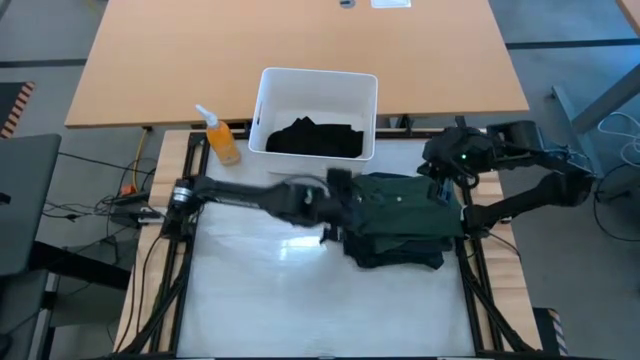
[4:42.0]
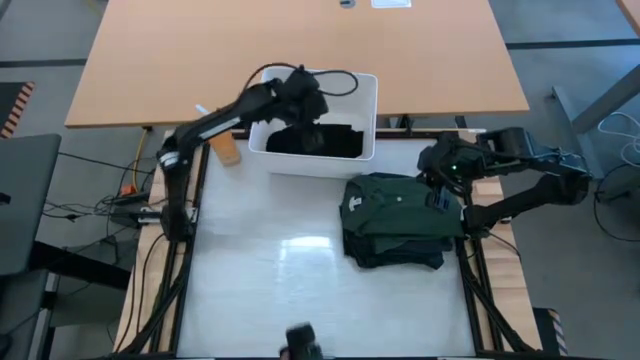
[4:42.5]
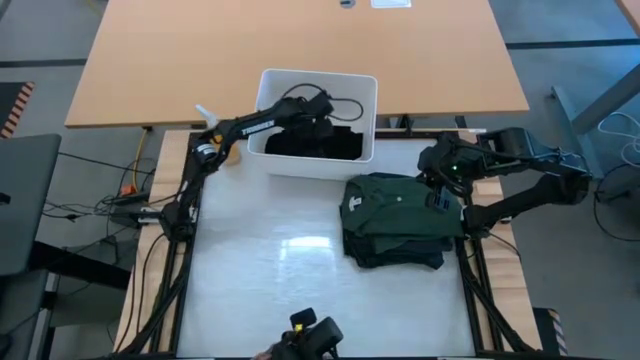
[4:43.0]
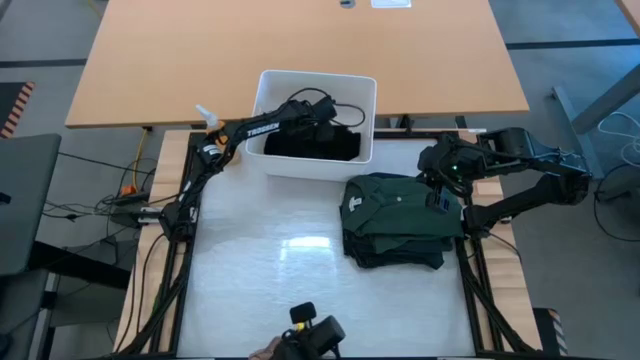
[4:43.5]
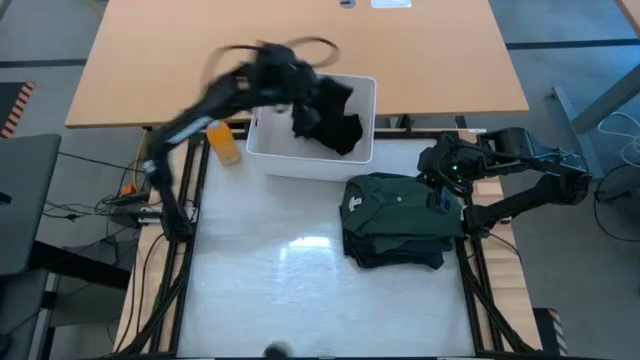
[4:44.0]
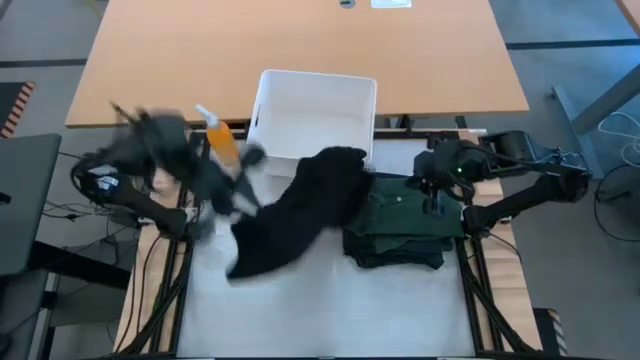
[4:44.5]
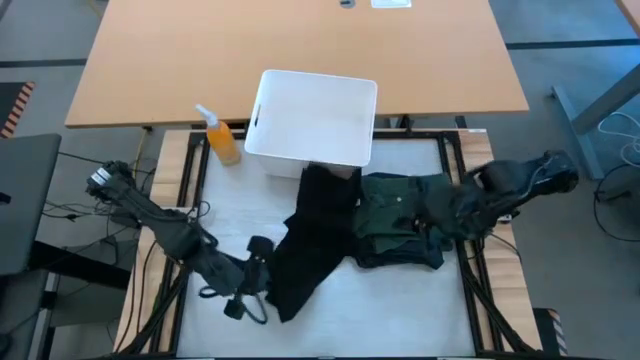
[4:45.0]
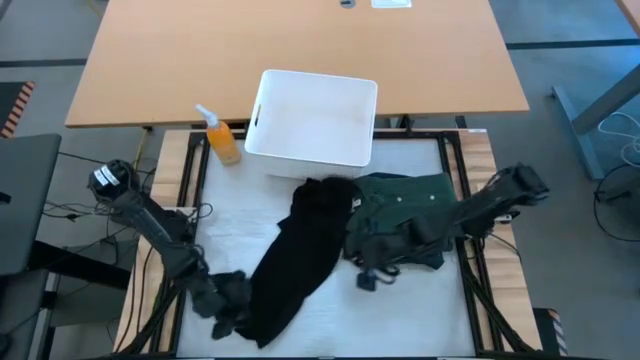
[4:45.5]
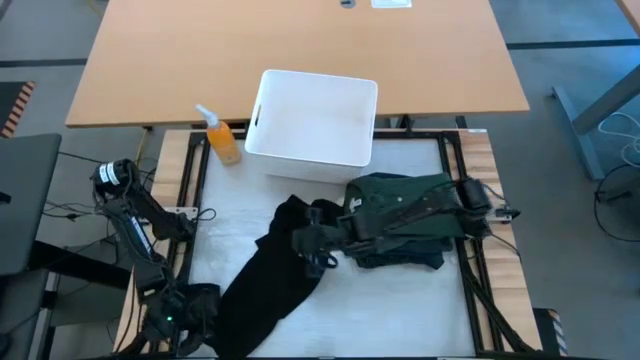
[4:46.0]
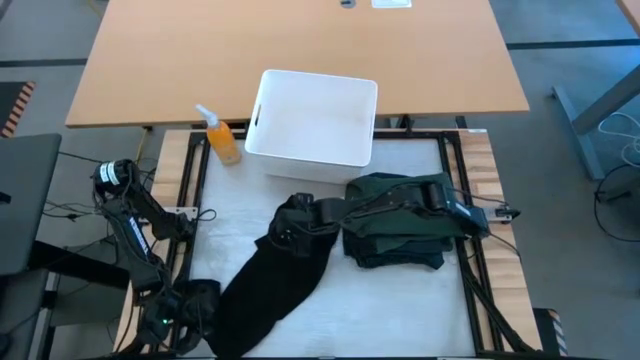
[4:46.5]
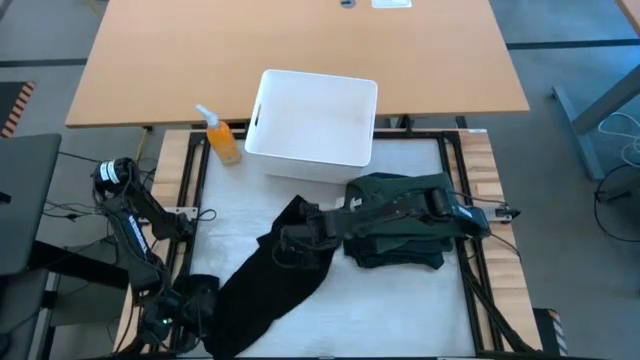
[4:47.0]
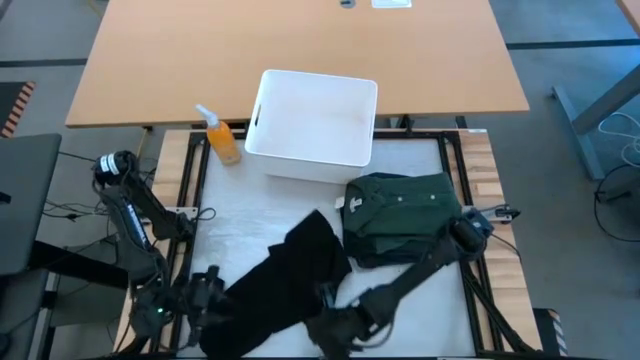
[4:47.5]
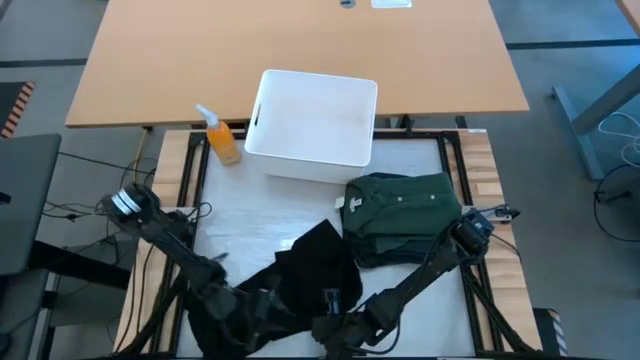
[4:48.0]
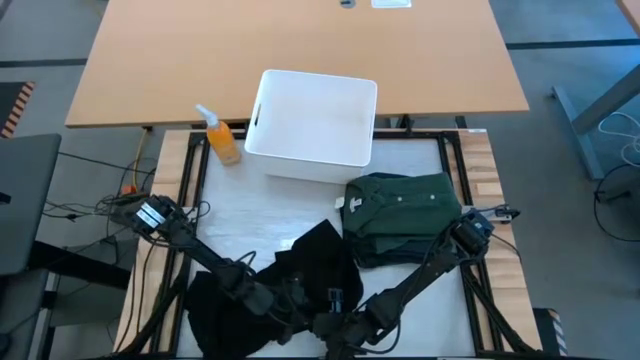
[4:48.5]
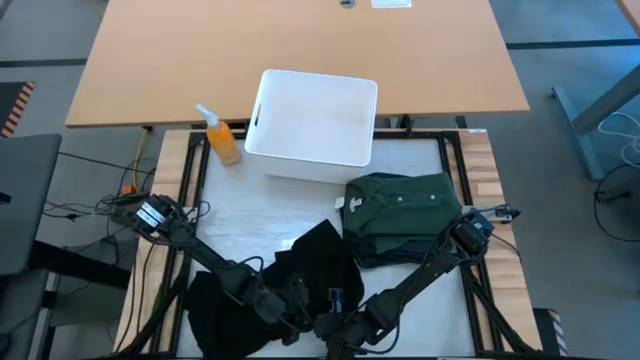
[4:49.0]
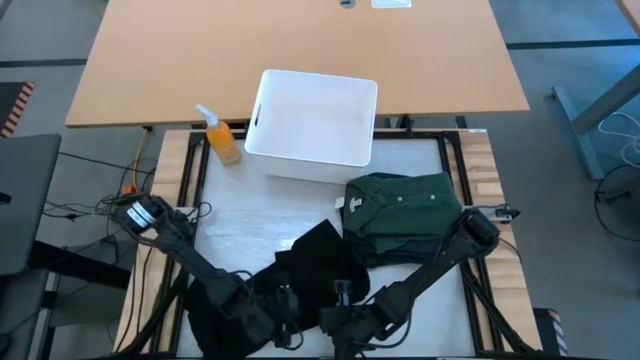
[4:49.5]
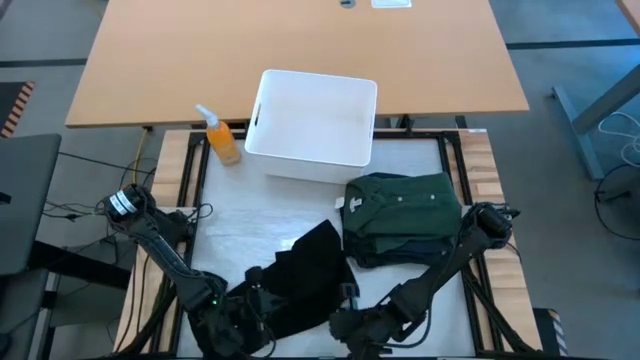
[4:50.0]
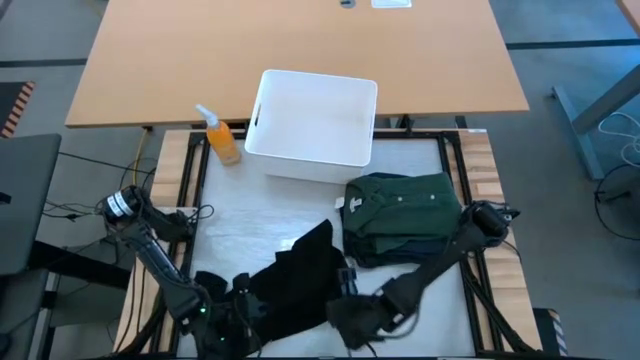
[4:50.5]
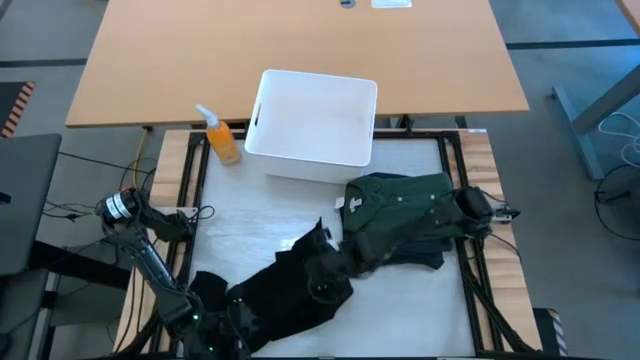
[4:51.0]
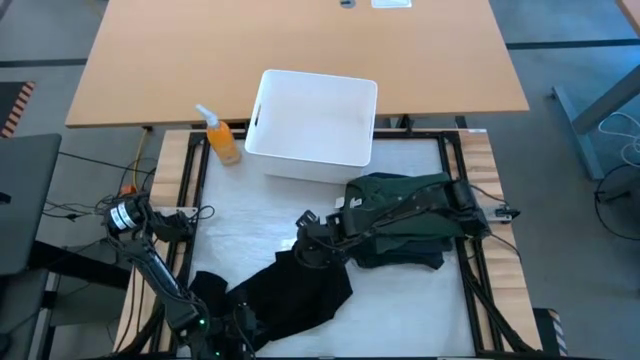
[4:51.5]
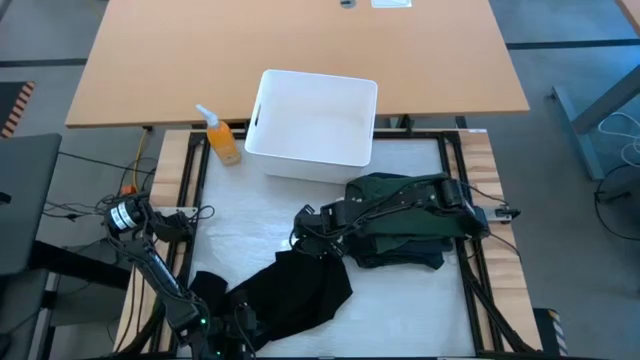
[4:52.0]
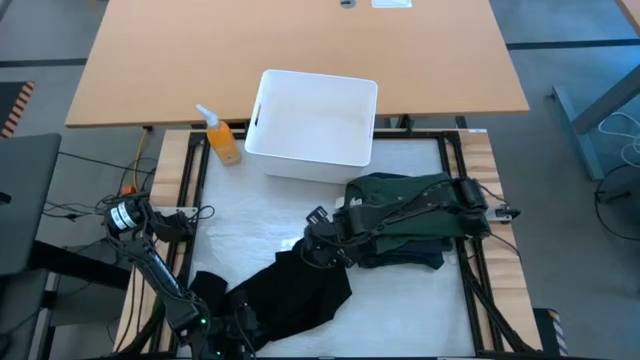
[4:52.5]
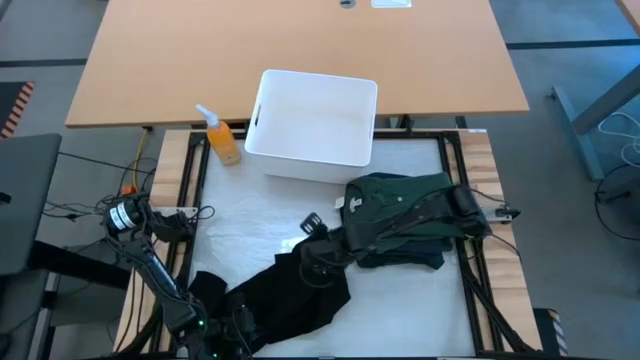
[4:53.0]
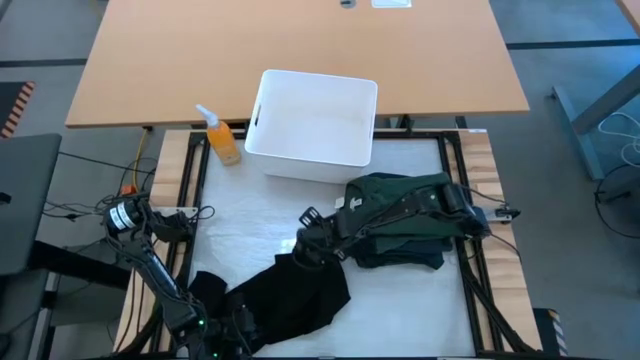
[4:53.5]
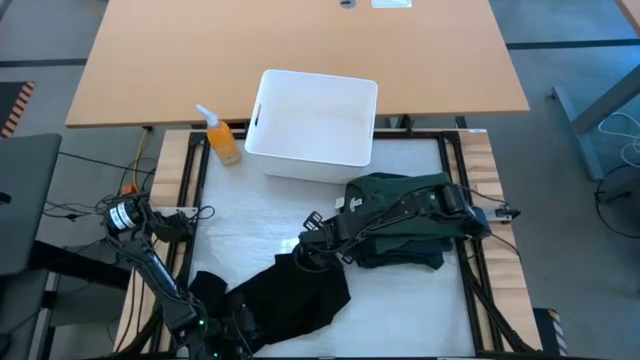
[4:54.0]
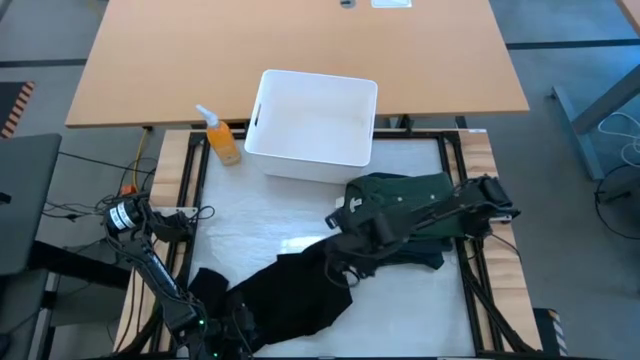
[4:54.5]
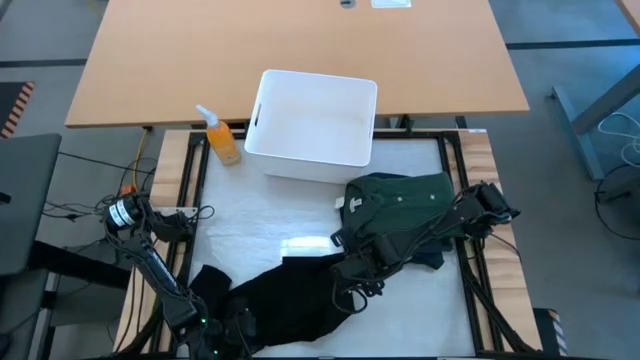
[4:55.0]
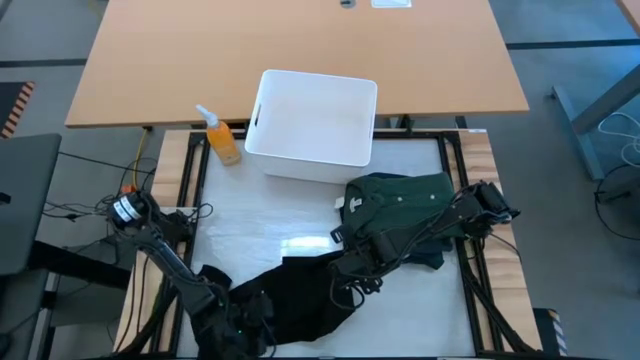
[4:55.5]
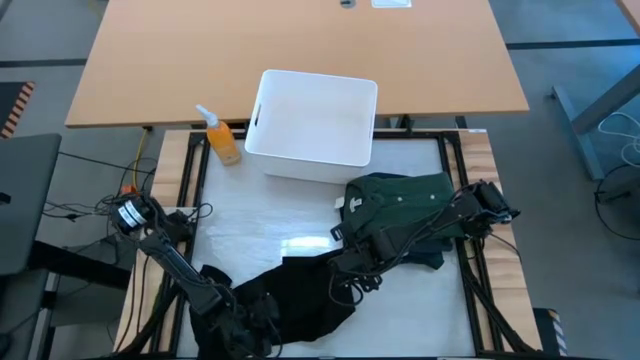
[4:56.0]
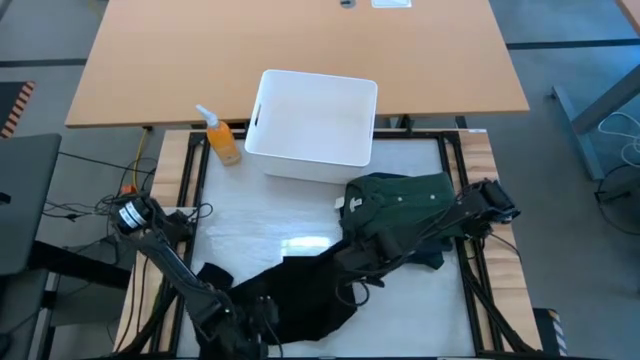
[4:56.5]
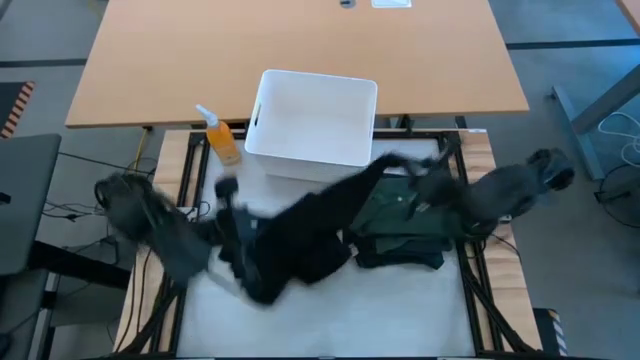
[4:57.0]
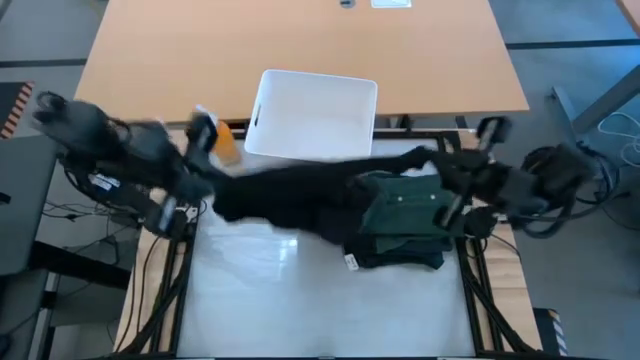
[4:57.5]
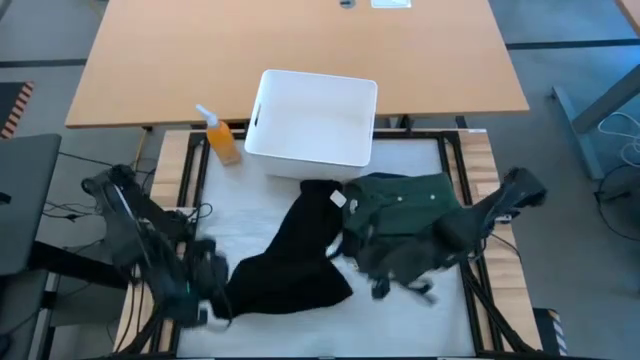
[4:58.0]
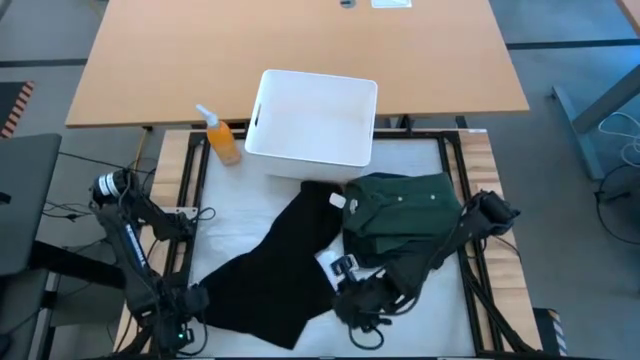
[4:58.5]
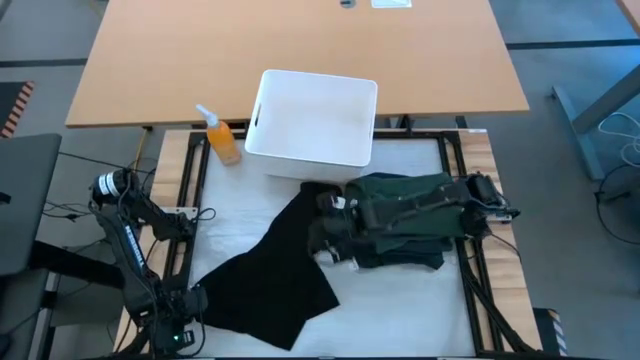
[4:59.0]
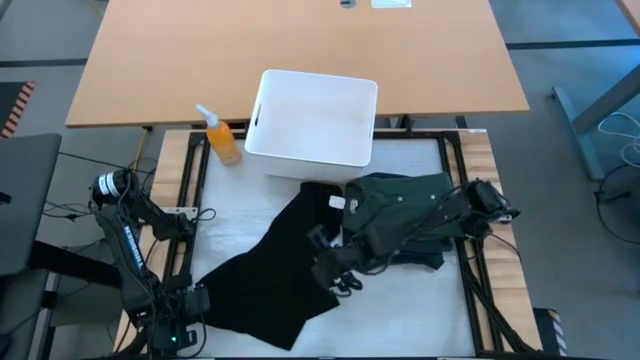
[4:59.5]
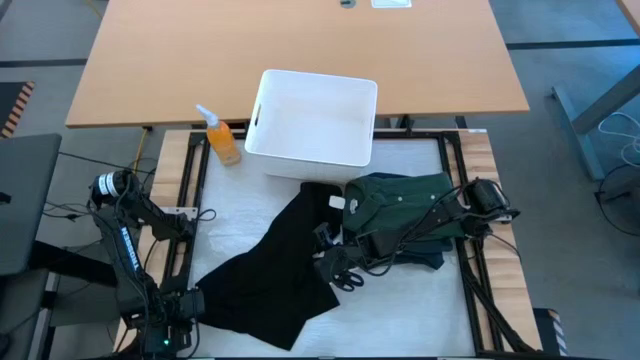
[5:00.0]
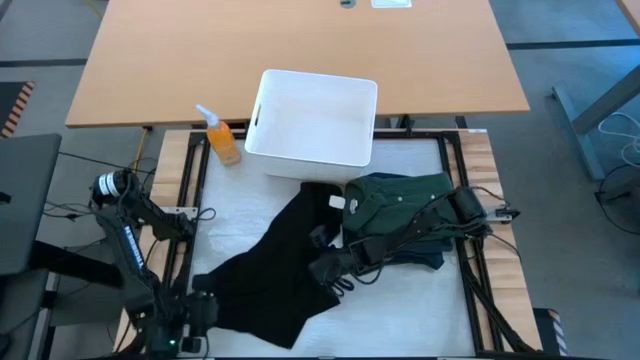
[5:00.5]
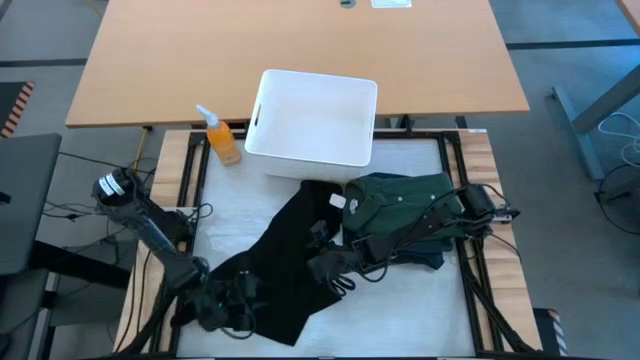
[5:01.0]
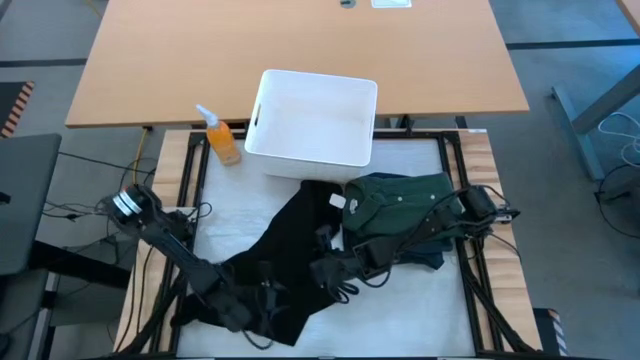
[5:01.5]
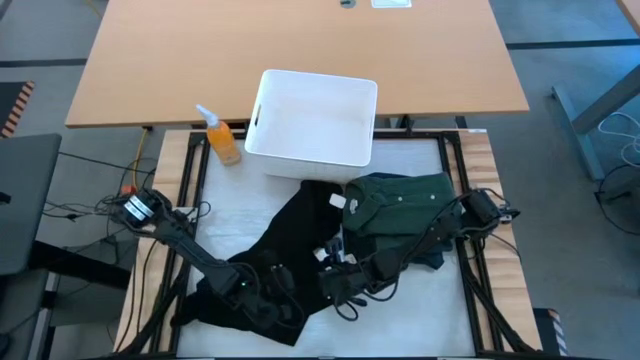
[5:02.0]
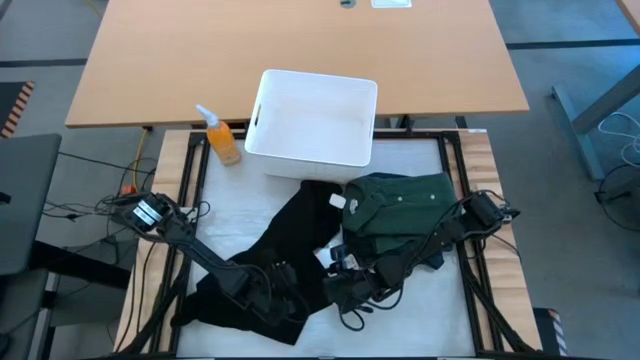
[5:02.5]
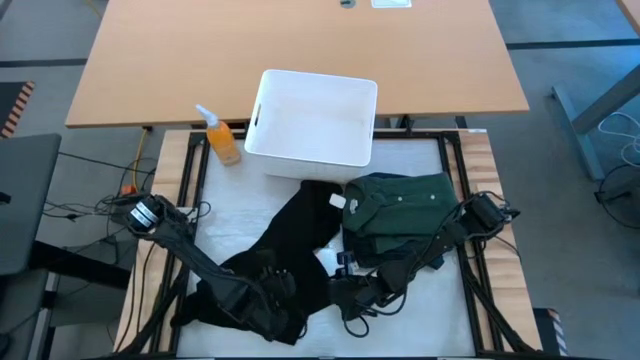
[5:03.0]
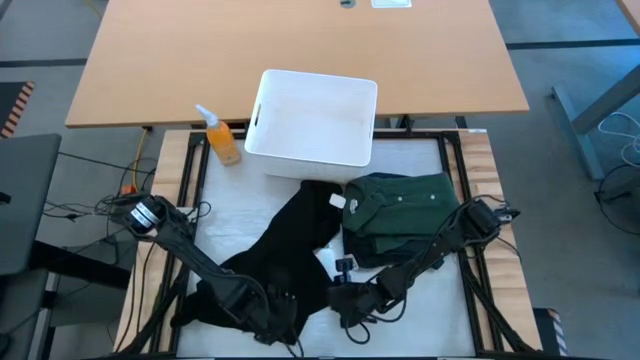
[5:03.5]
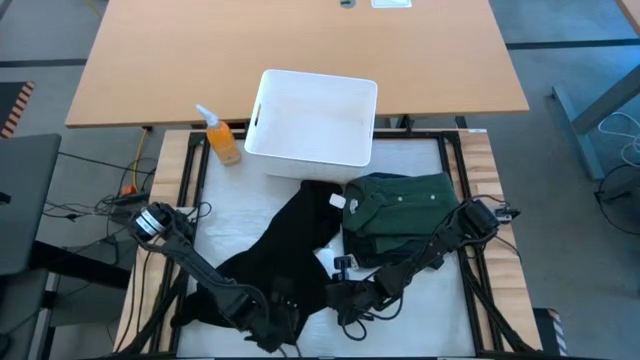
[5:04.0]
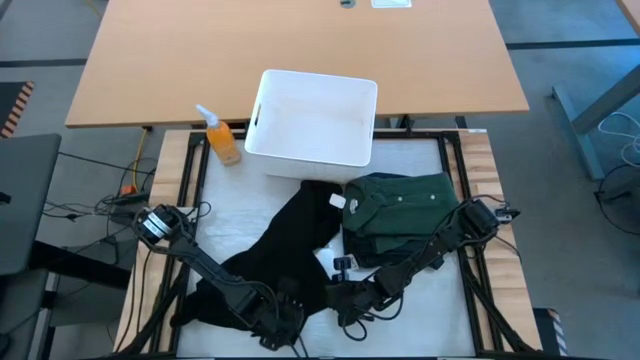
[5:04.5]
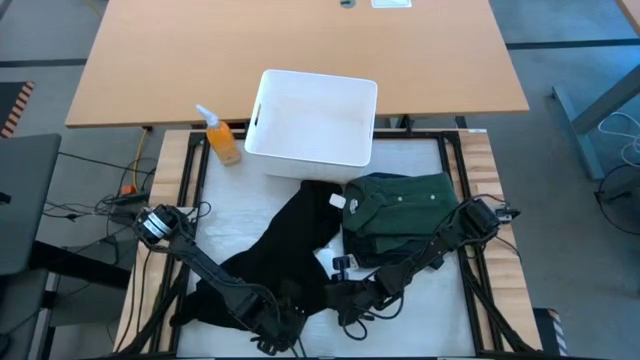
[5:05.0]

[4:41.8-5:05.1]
Task: Fold laundry
Fold the black shirt from the white laundry organizer
